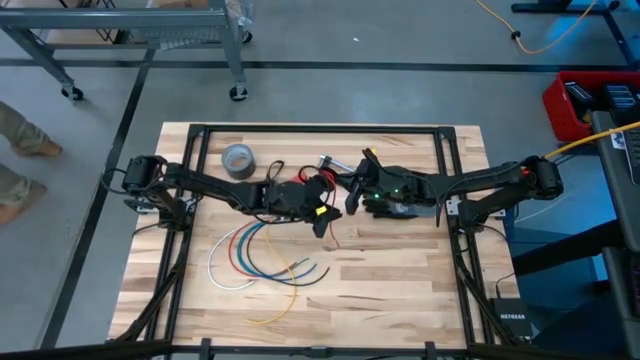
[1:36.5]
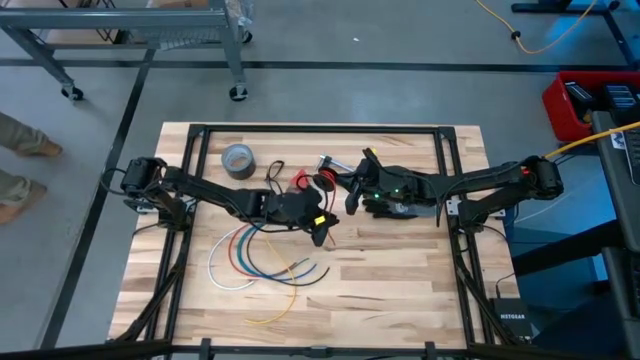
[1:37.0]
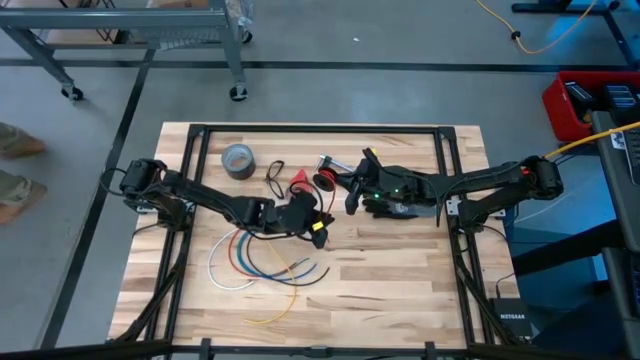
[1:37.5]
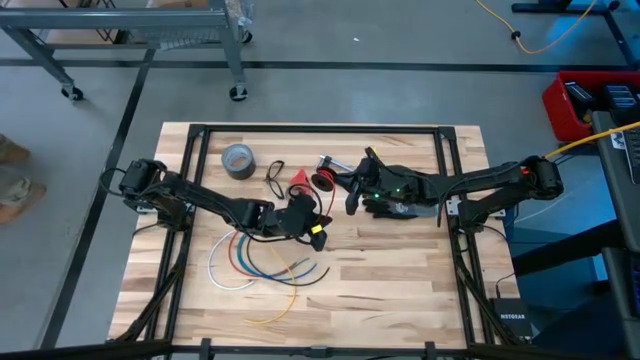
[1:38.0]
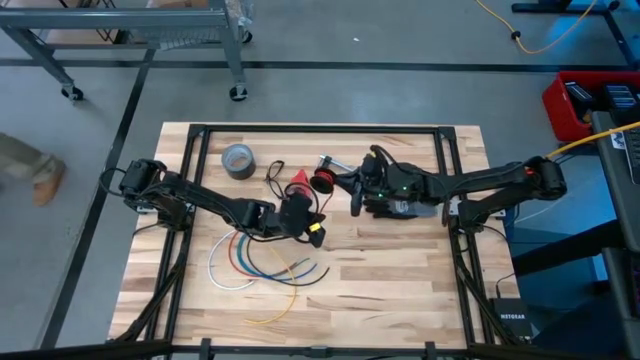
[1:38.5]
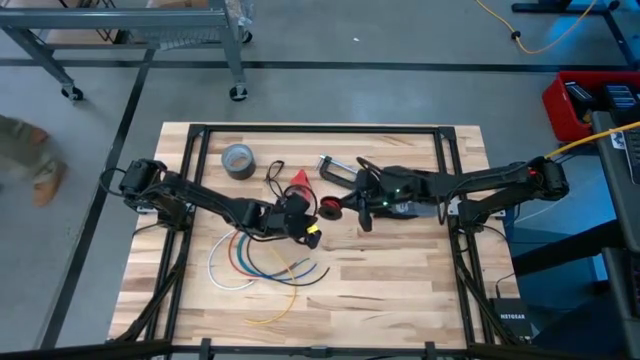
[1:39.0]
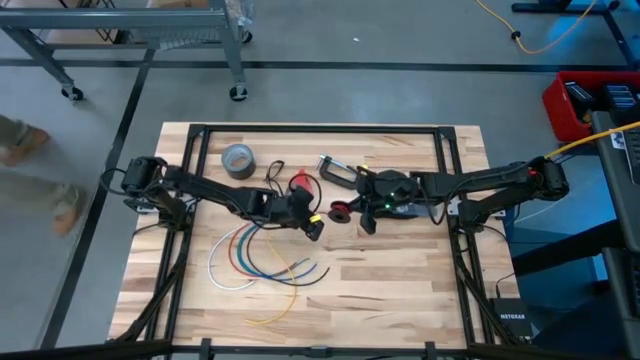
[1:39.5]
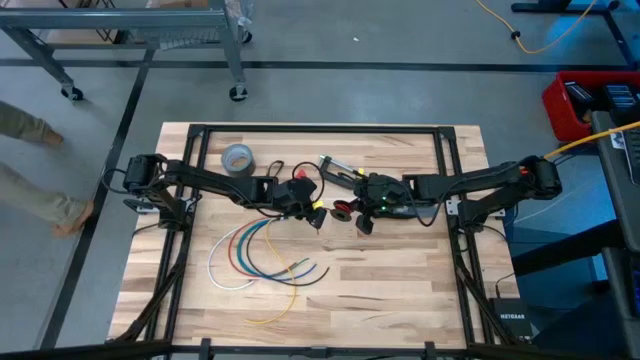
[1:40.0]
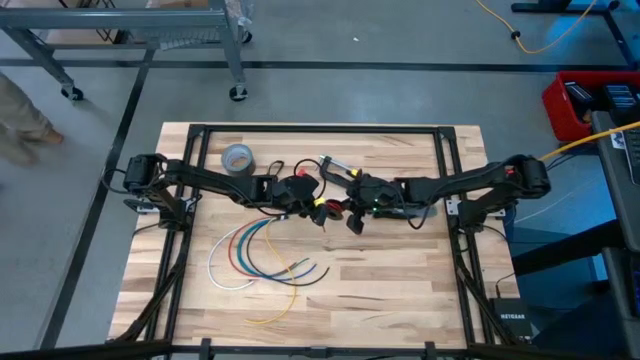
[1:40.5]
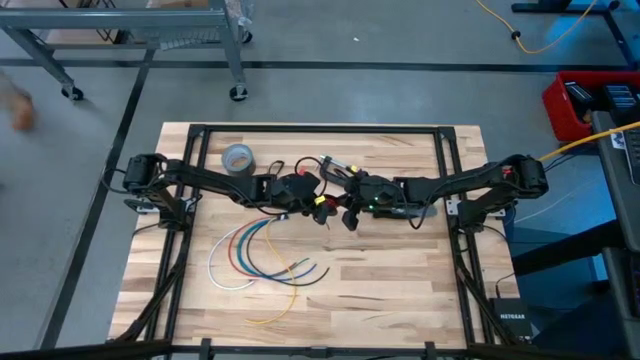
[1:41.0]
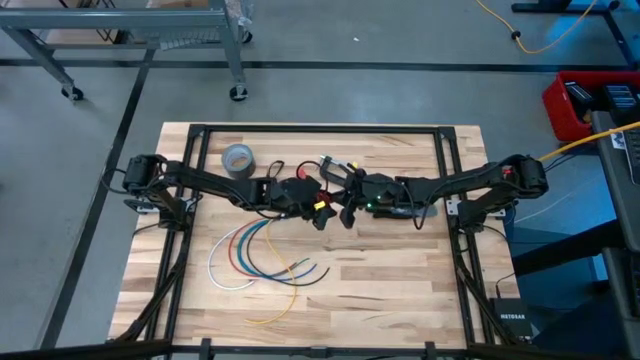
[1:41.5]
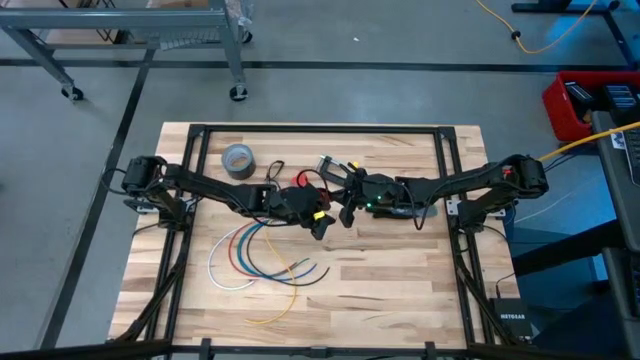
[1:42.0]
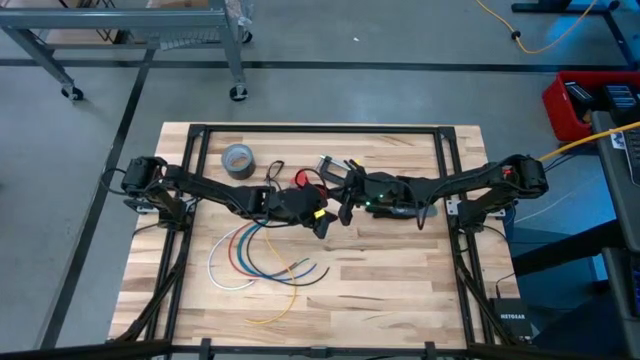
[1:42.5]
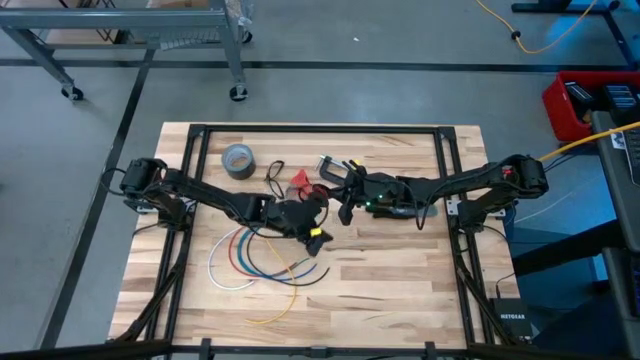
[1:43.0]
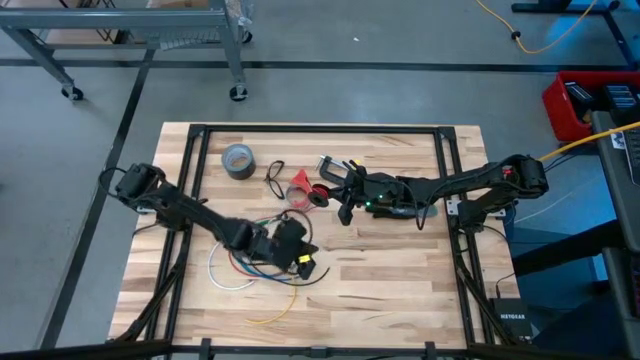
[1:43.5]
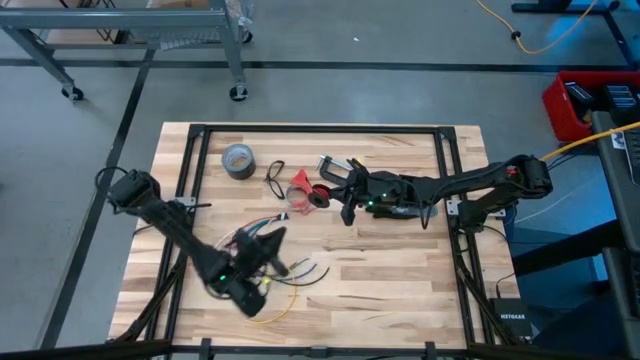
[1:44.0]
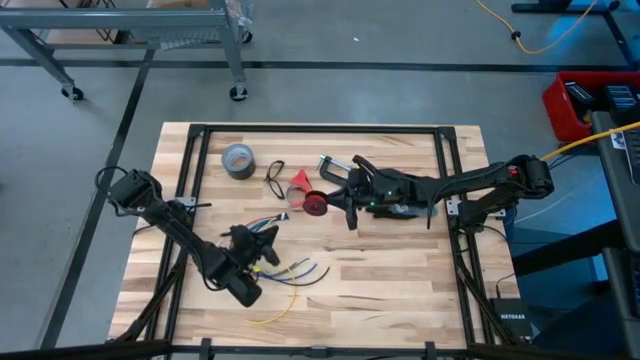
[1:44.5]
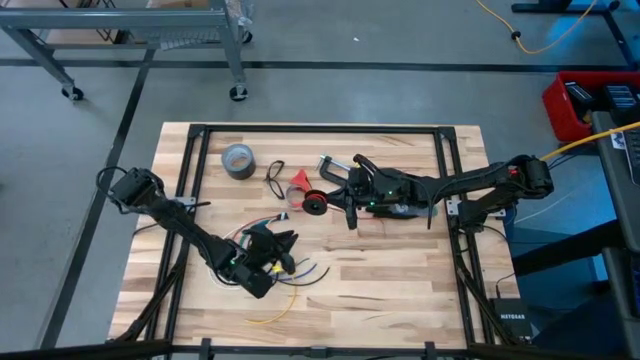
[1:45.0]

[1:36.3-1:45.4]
Task: Coil cords
Coil the orange wire on the spool

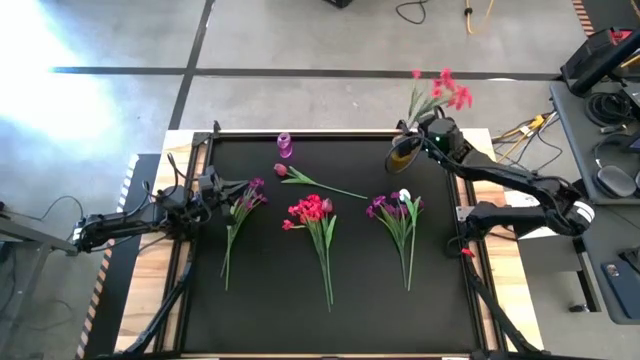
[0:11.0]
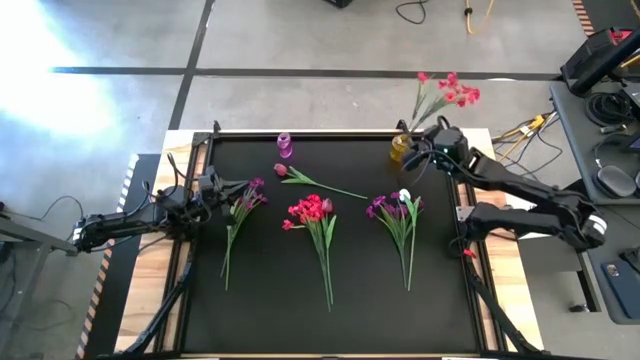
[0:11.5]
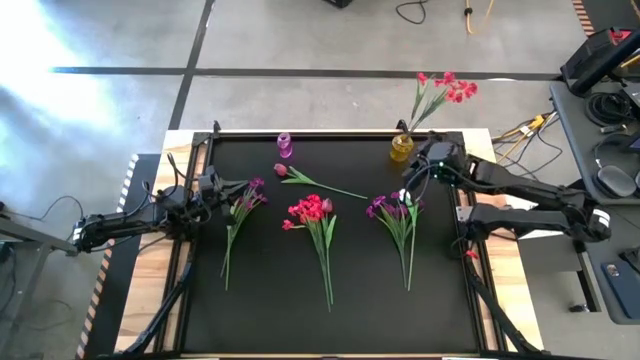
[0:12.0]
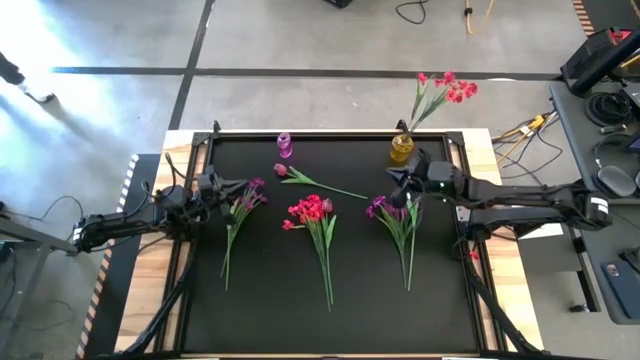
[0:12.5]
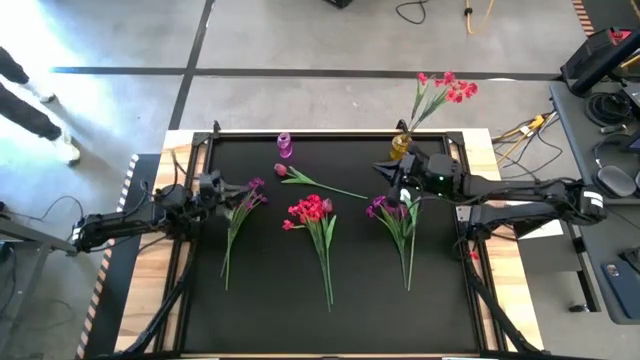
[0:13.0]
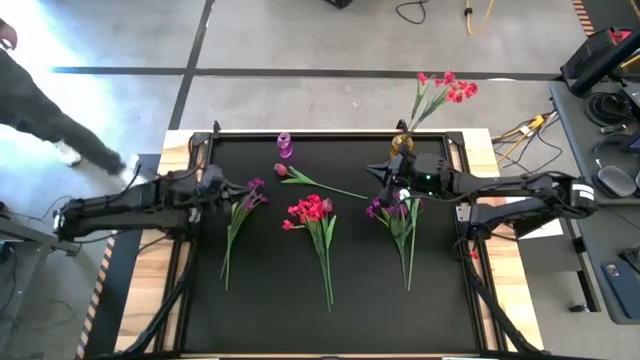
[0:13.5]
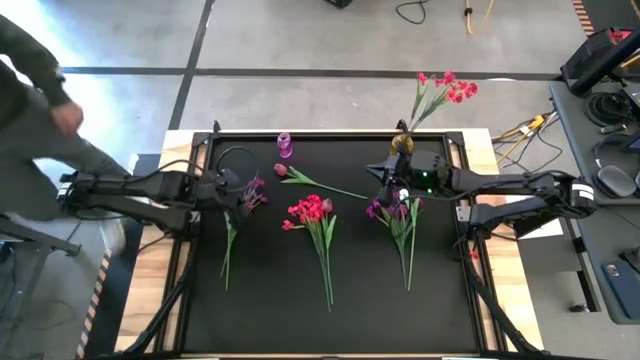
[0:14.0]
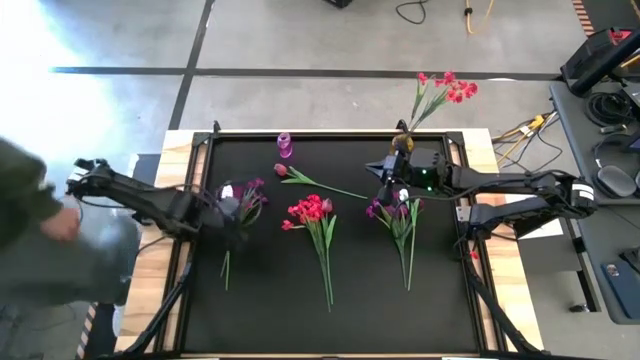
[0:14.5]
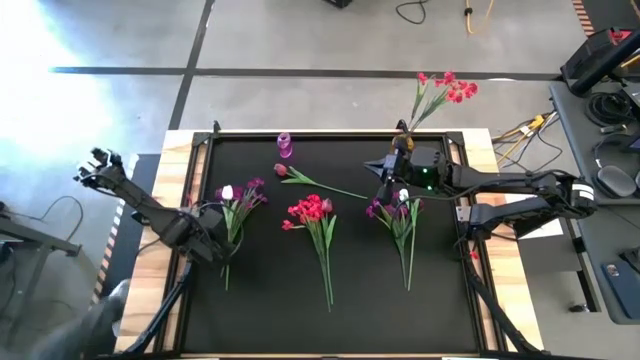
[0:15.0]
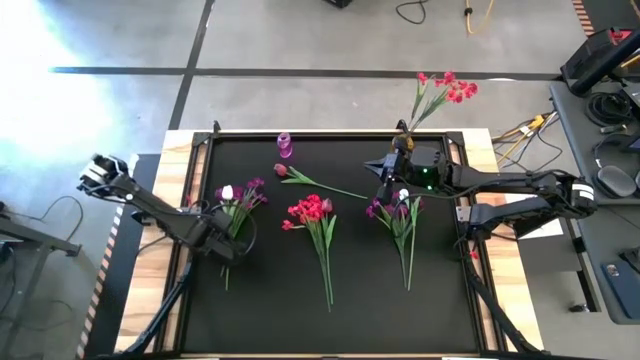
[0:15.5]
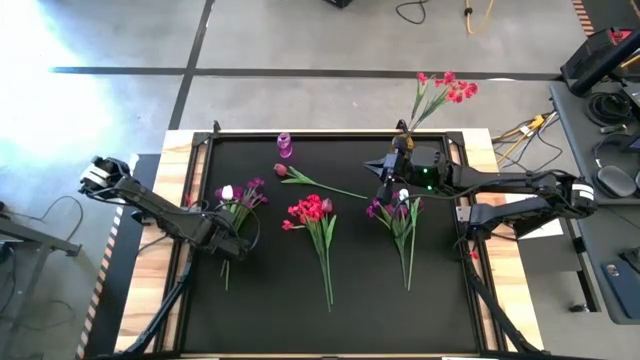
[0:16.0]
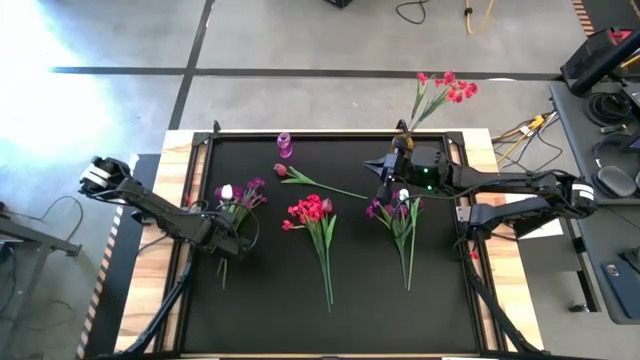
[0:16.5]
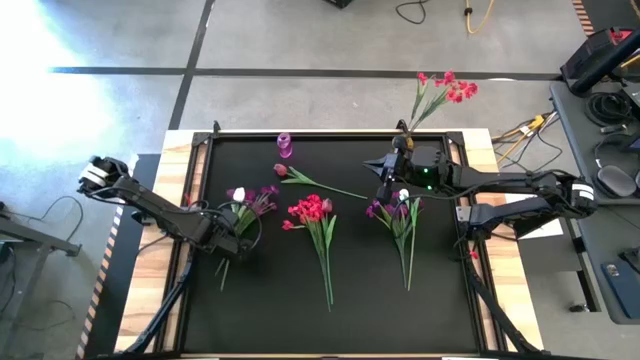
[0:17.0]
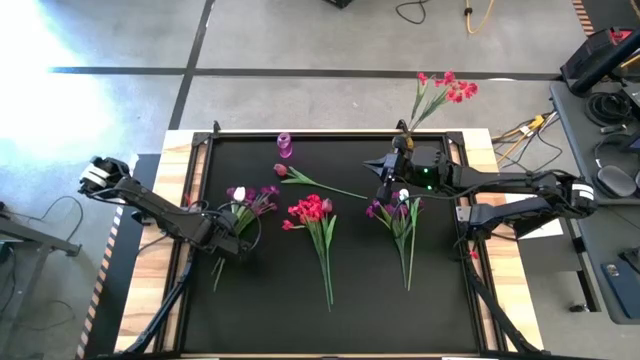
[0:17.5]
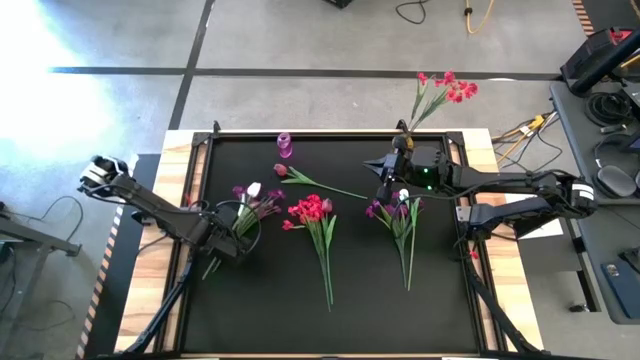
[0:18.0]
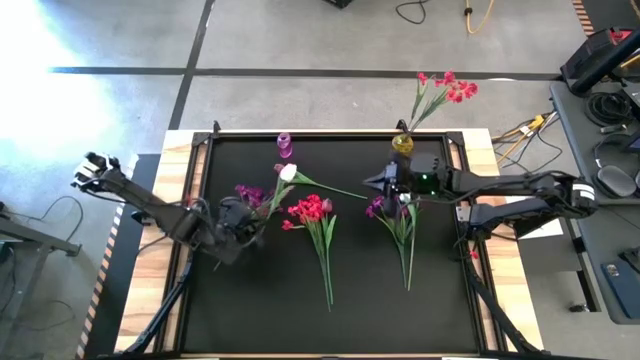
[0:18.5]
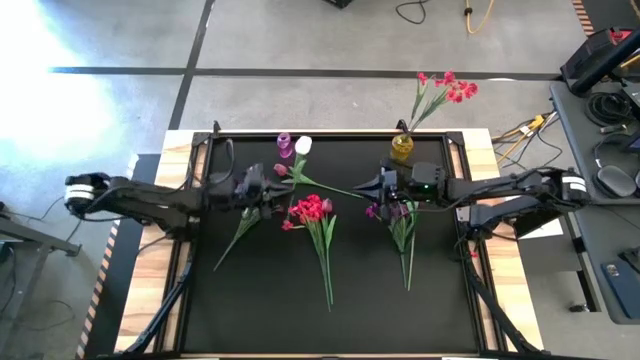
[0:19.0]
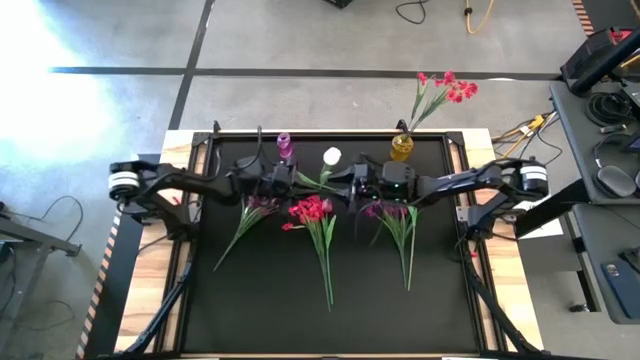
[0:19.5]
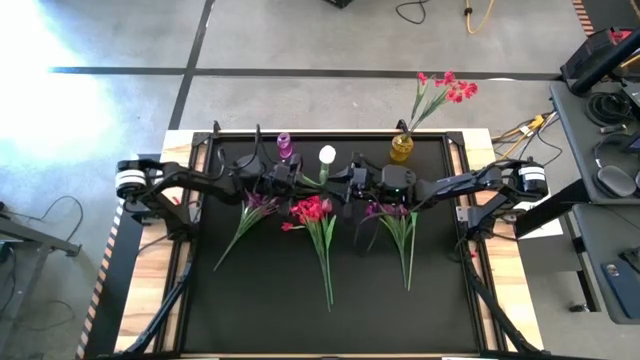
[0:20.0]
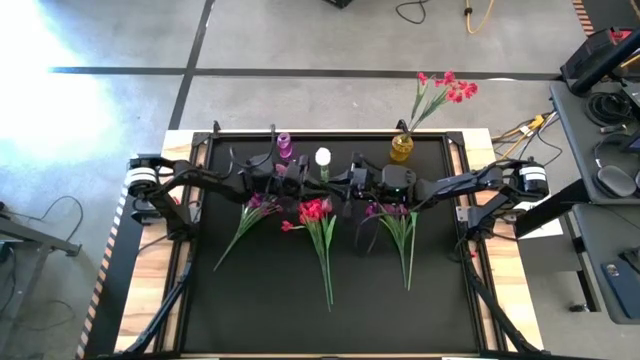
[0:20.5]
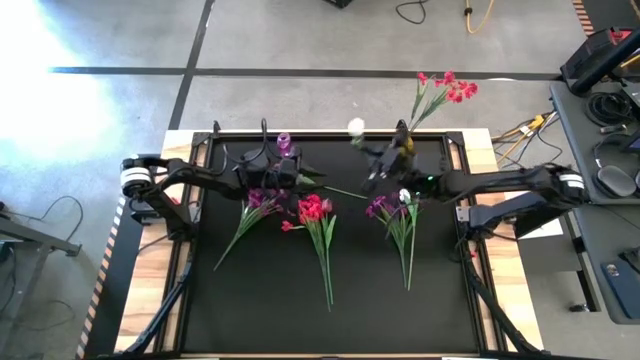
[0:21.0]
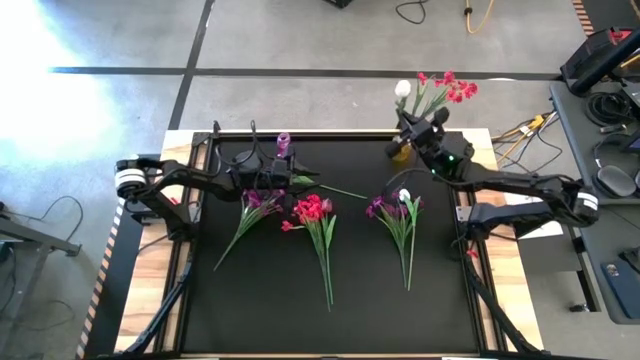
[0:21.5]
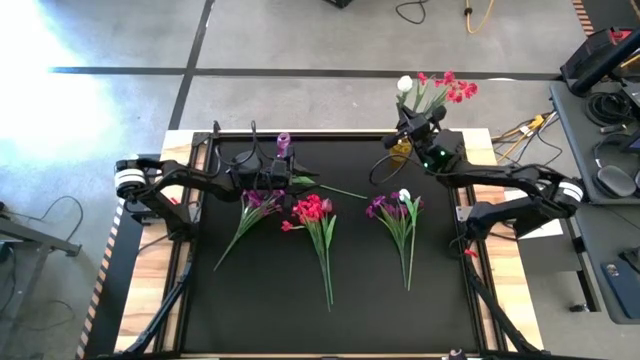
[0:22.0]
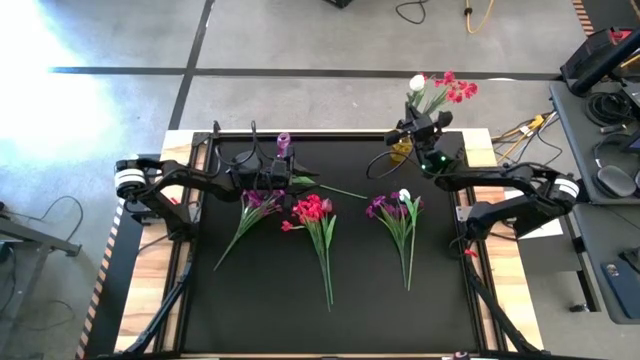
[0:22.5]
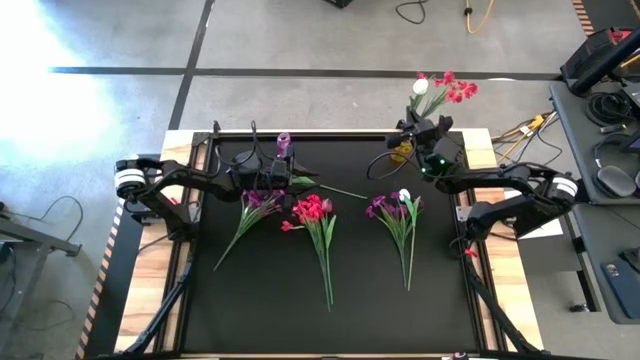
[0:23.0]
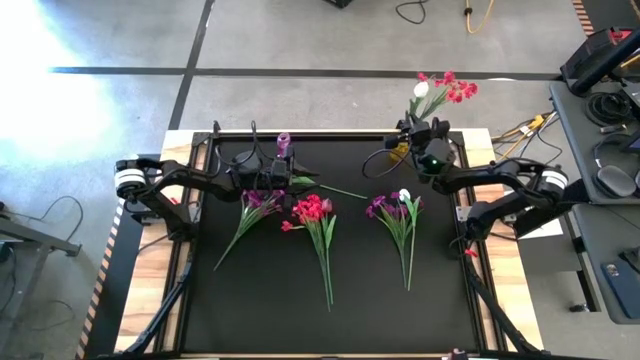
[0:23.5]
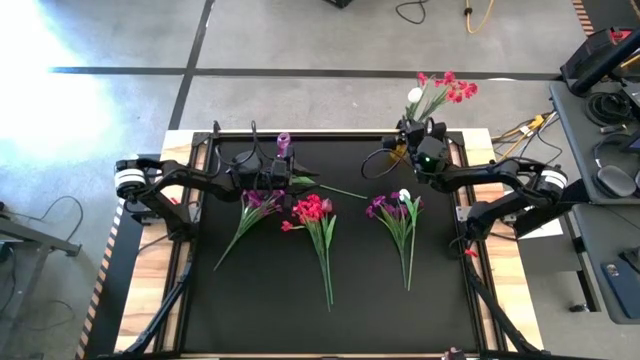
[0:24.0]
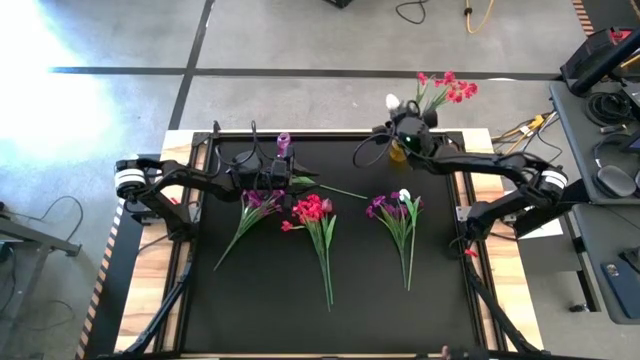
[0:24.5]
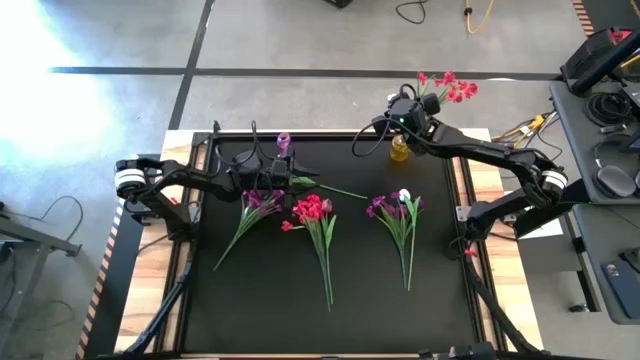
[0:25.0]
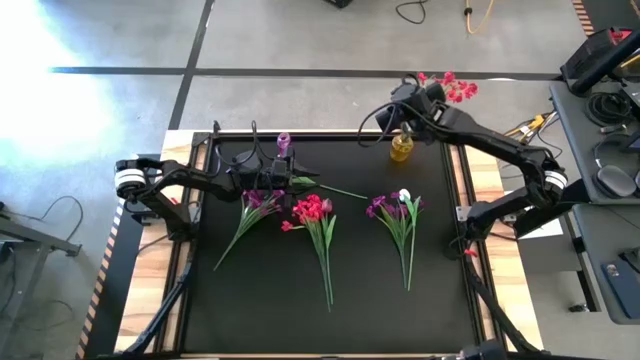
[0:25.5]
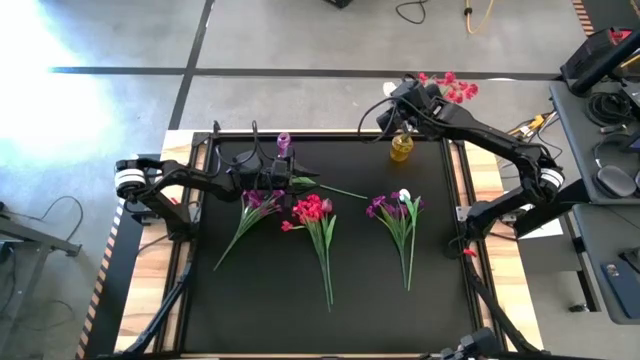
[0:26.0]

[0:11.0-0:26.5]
Task: Sort flowers into vase by color
Put the left white flower into the yellow vase
